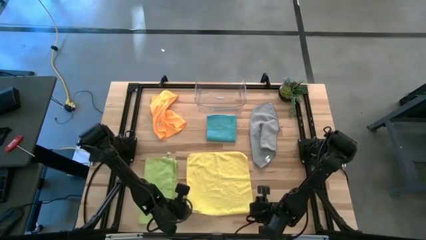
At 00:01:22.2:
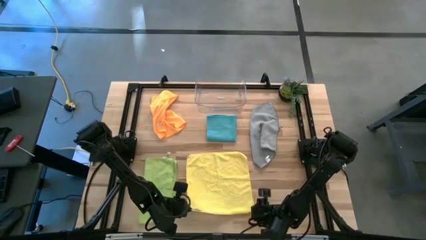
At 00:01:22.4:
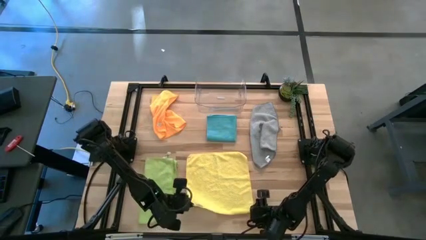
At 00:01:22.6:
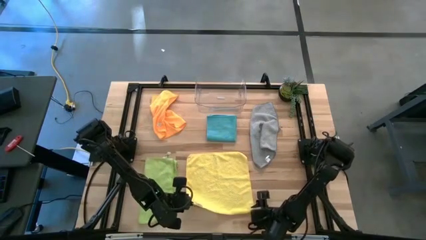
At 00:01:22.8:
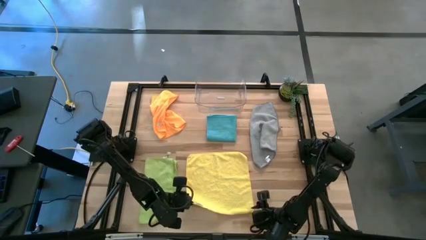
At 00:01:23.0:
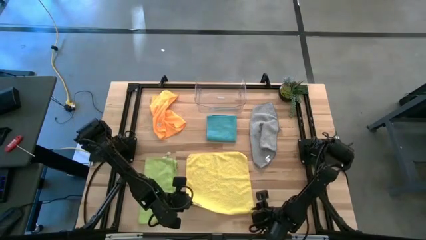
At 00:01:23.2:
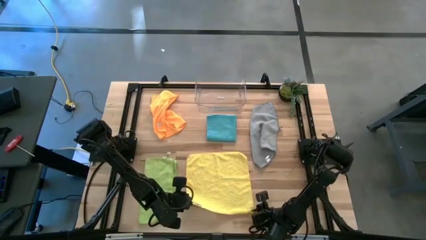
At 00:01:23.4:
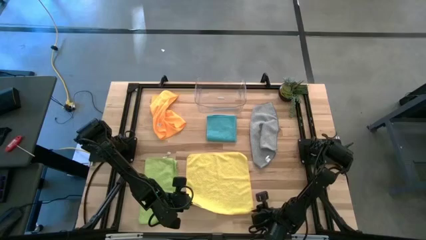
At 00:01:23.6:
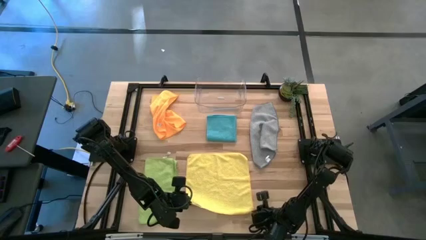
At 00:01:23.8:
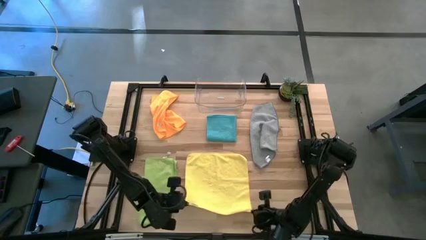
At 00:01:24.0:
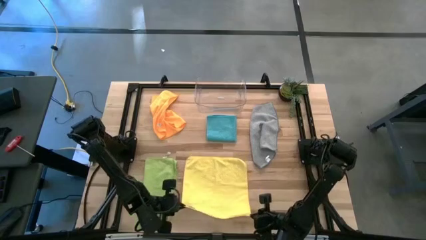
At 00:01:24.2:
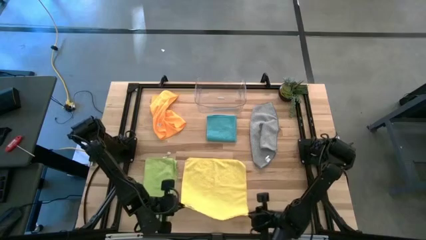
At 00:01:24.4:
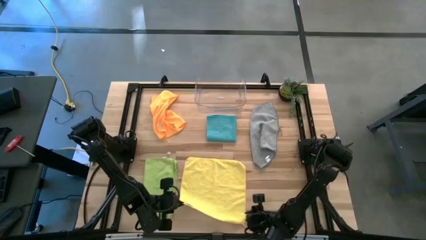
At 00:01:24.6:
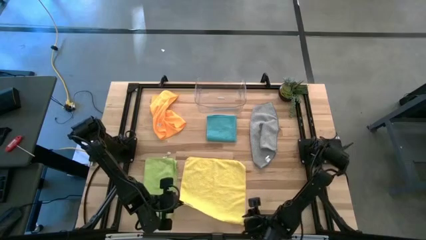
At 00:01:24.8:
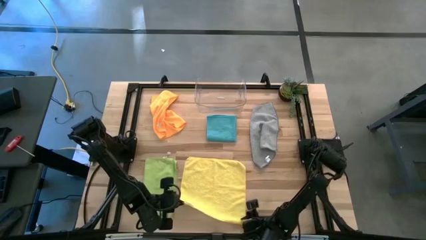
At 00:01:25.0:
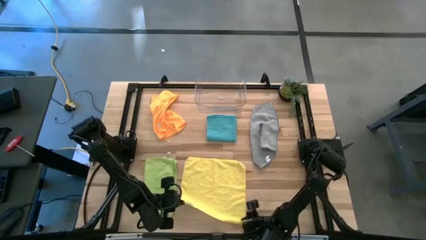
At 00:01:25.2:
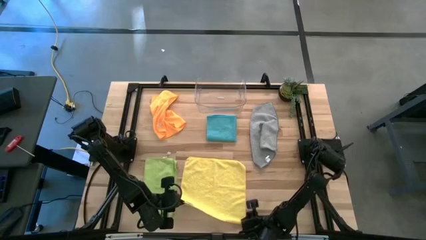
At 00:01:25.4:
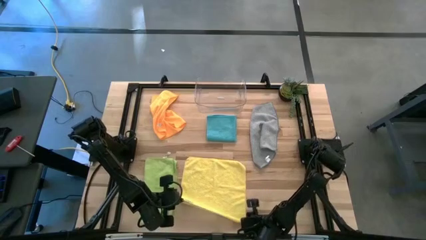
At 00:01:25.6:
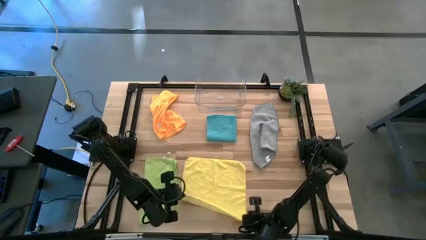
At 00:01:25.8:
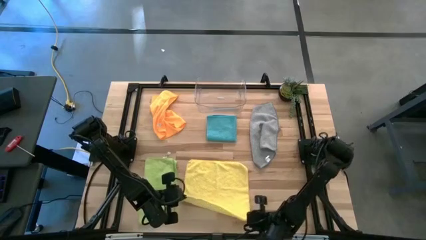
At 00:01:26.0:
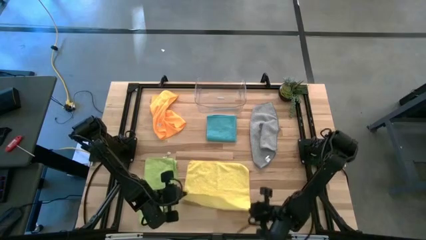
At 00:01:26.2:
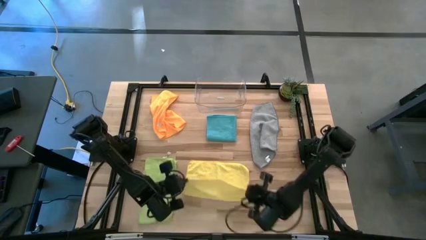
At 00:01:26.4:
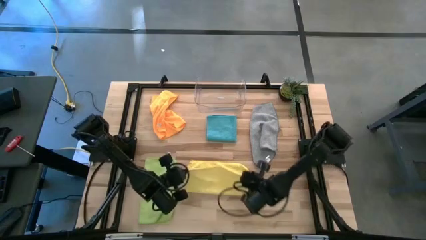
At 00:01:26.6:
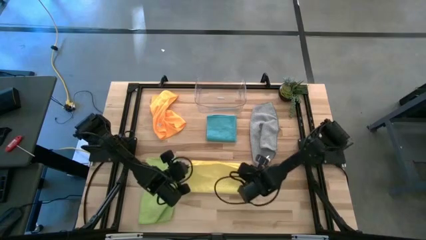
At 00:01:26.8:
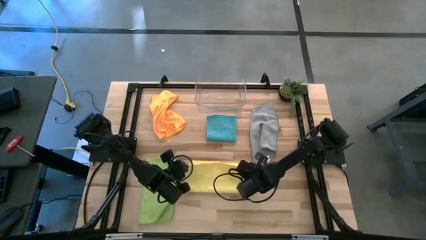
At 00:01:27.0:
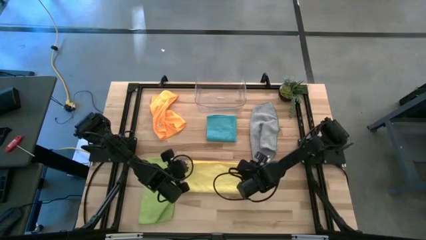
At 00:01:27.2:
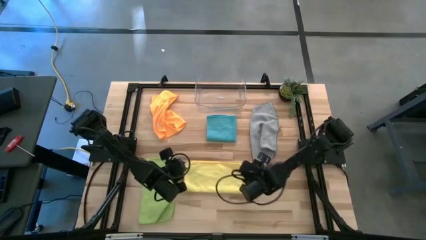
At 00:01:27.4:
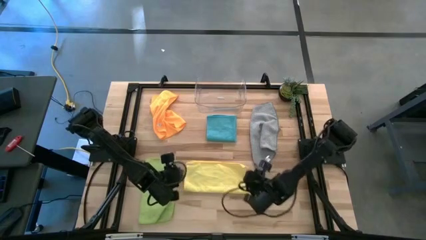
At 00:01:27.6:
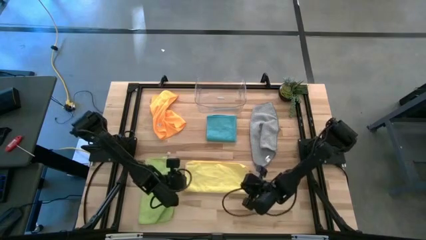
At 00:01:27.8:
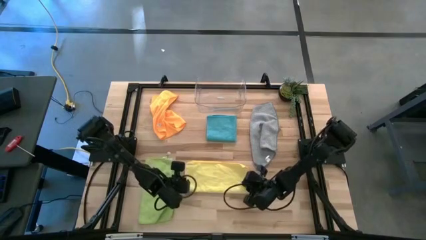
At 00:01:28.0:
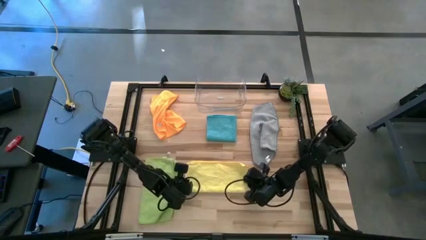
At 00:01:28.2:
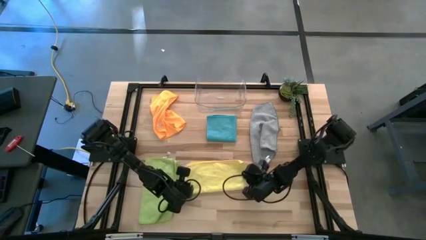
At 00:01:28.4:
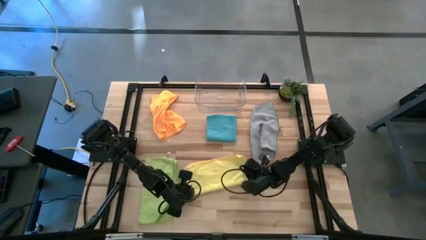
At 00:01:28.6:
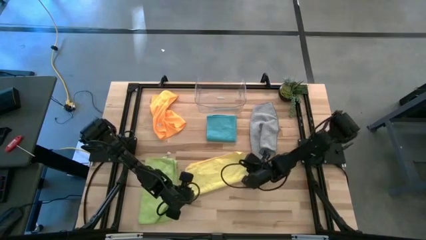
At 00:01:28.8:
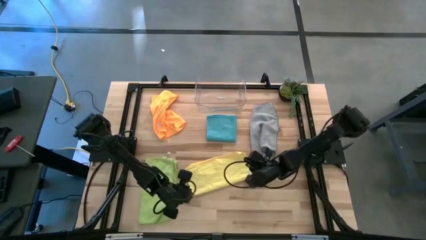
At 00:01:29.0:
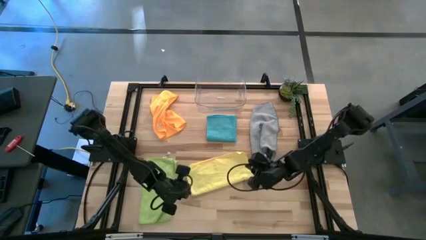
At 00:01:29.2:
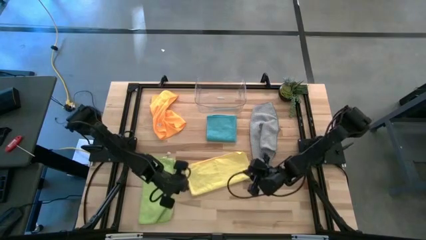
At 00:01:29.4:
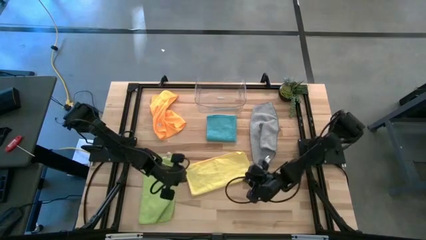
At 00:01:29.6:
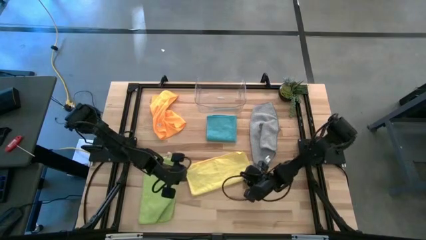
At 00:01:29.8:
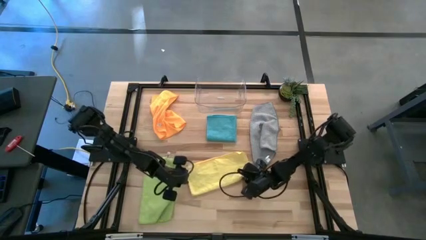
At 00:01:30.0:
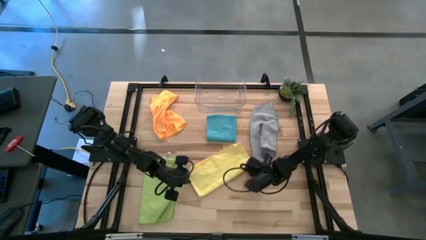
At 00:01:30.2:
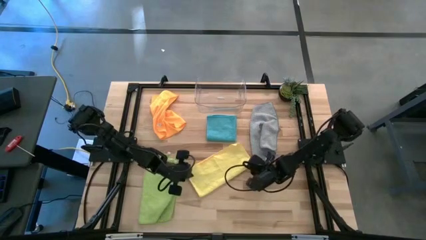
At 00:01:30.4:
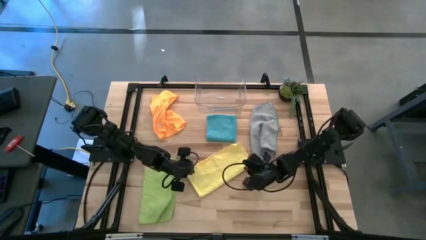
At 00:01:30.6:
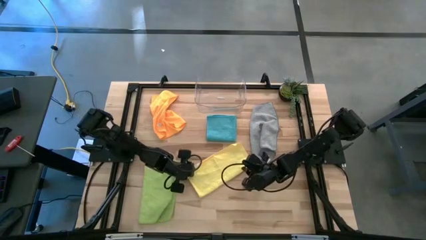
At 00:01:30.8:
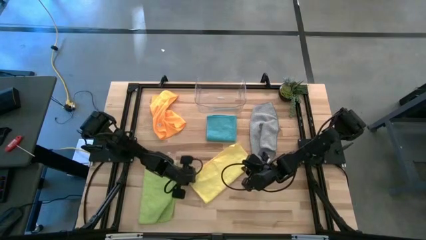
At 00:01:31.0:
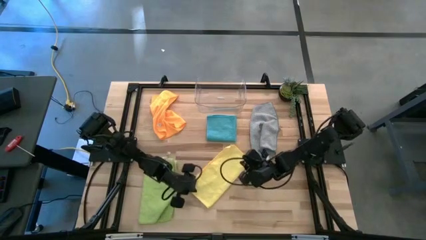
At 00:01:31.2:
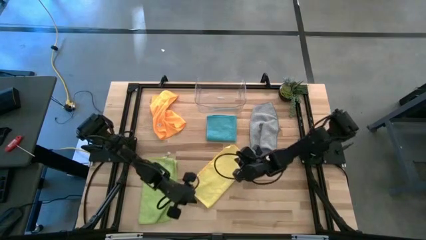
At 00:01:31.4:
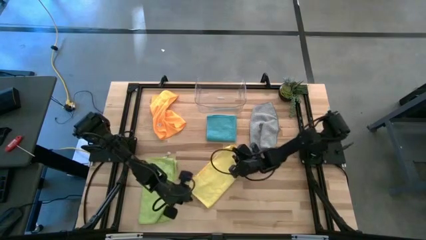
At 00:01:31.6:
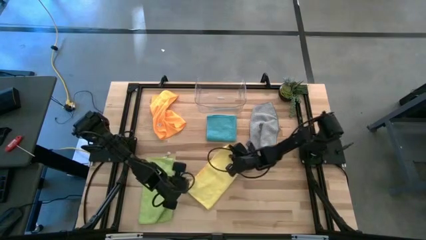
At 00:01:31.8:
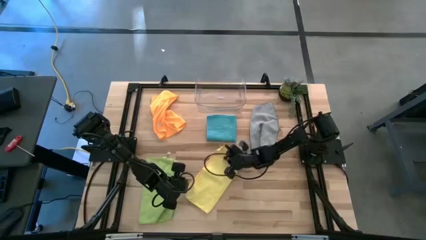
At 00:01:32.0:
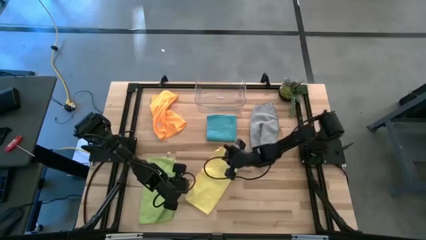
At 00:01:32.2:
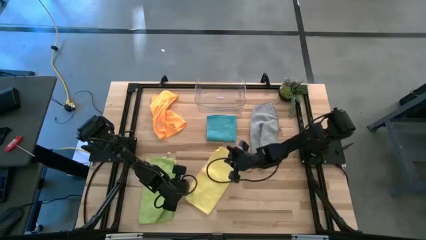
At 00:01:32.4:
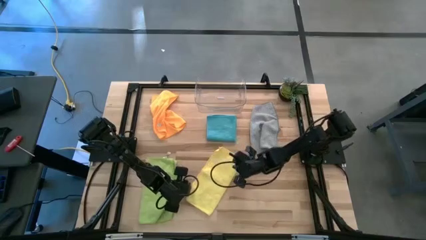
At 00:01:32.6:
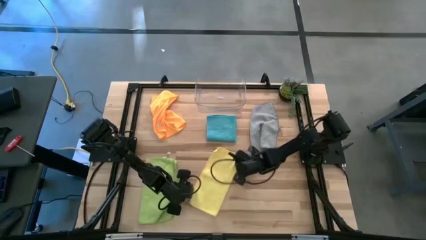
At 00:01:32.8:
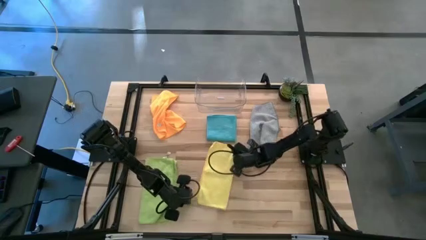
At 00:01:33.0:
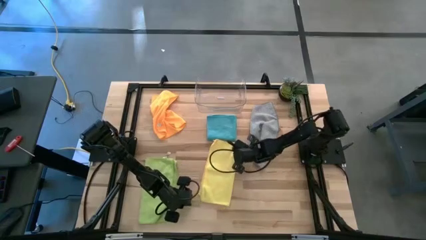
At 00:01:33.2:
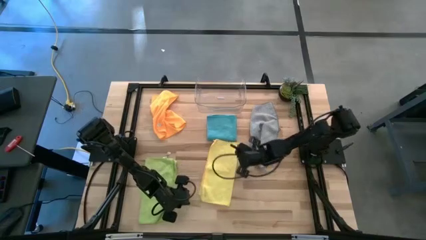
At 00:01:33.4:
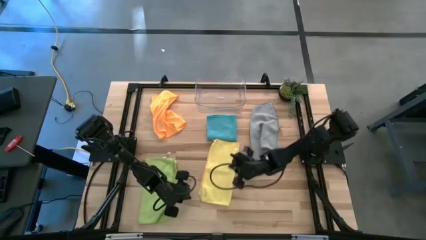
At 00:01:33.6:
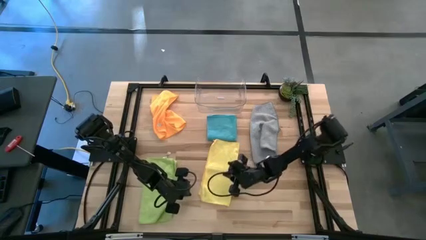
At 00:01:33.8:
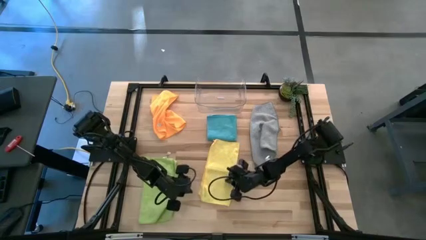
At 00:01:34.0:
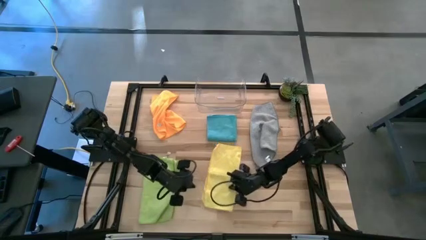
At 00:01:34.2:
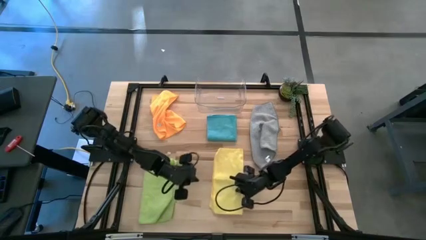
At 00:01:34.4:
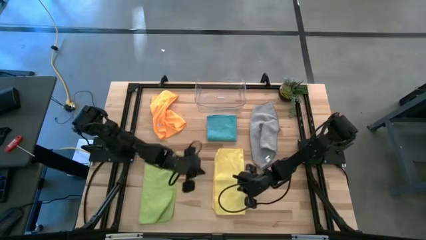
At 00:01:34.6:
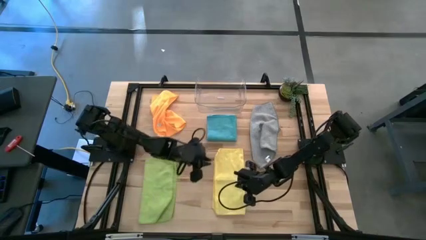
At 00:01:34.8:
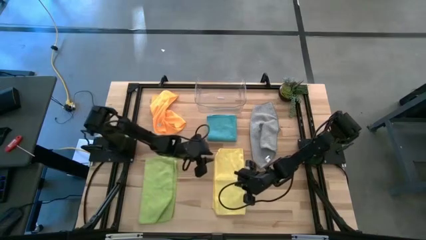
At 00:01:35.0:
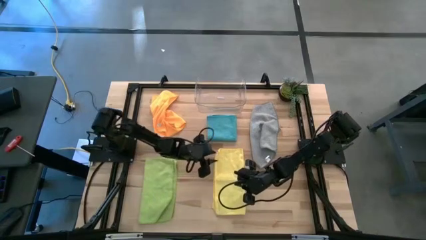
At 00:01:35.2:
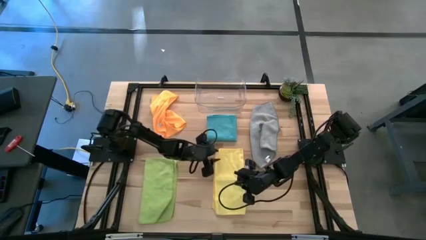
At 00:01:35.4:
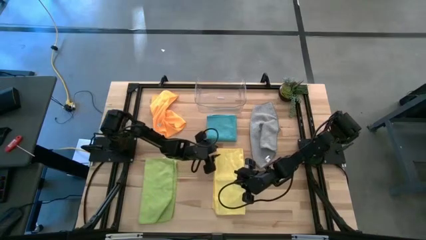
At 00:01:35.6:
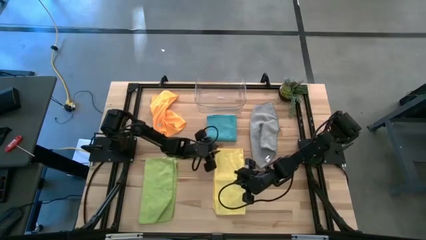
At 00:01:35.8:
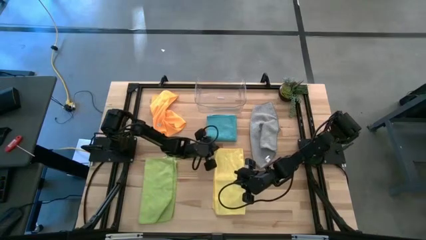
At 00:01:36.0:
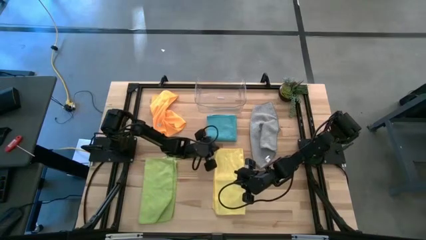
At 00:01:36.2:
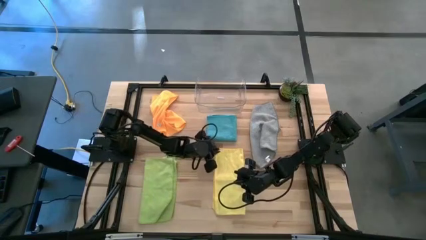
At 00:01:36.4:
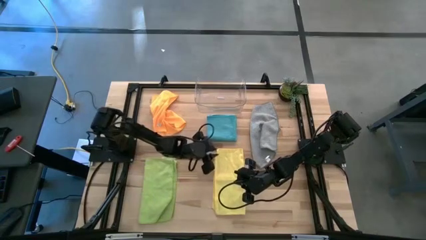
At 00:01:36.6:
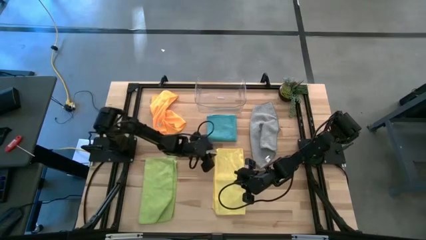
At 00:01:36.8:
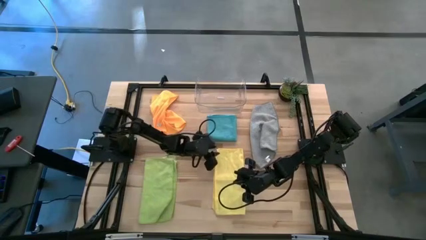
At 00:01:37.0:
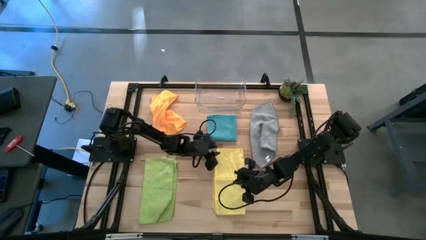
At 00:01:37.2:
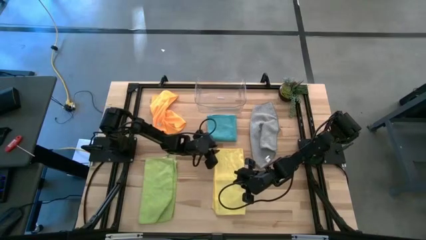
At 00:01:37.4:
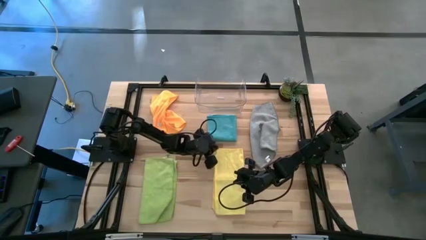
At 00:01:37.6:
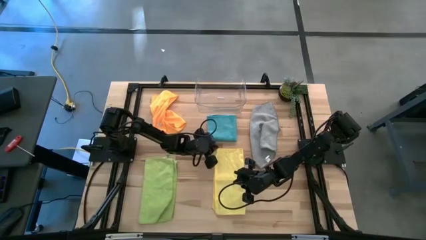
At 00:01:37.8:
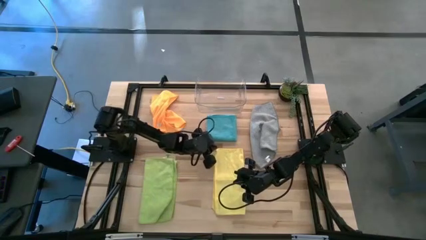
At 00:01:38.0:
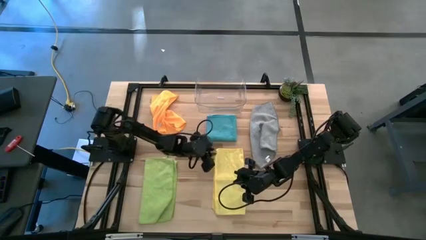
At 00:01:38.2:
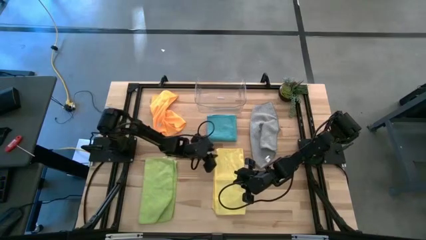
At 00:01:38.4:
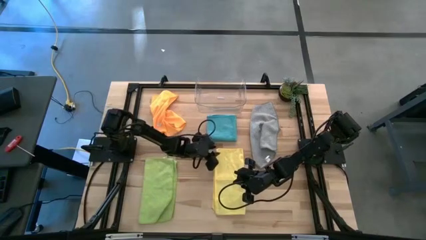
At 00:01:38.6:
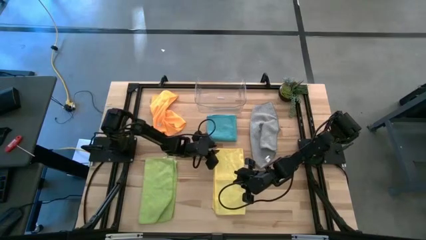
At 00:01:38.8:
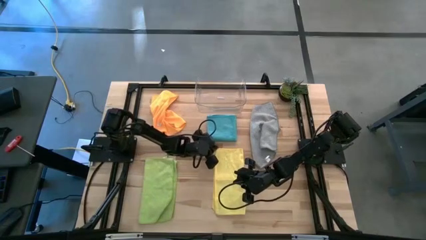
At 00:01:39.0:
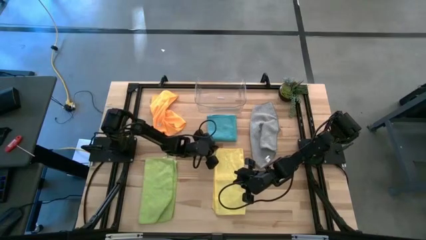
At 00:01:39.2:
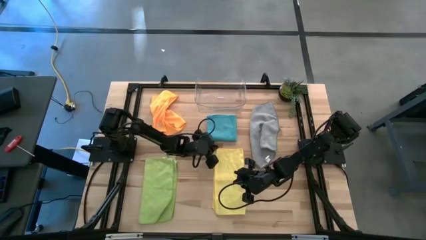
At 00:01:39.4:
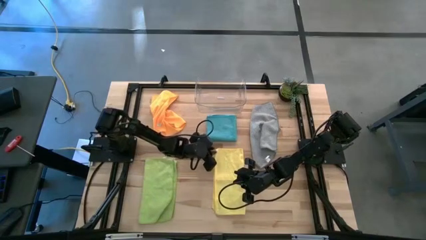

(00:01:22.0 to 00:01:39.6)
Task: Fold microfiber towels
Fold the yellow microfiber towel on the table
